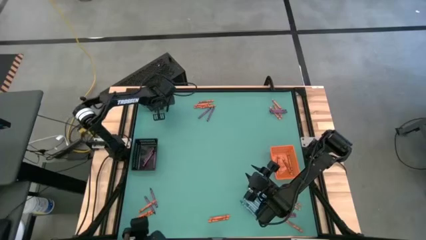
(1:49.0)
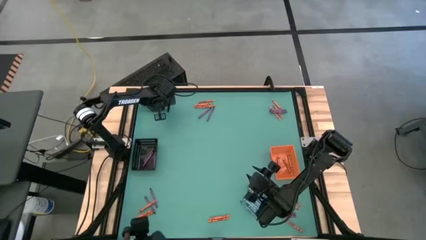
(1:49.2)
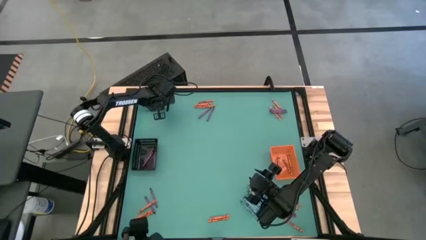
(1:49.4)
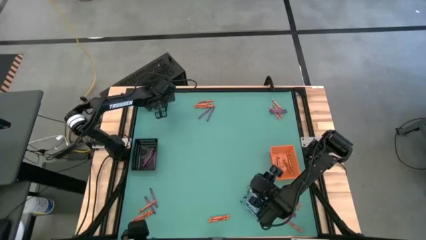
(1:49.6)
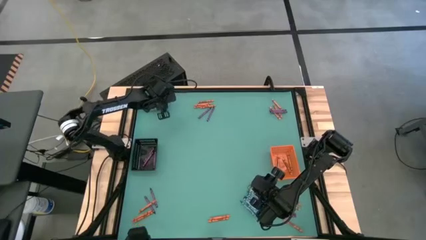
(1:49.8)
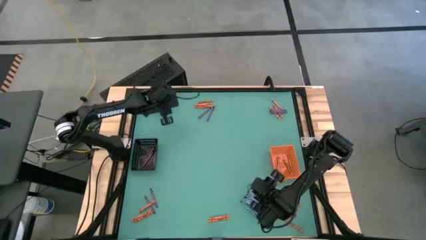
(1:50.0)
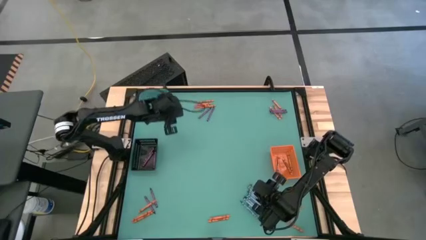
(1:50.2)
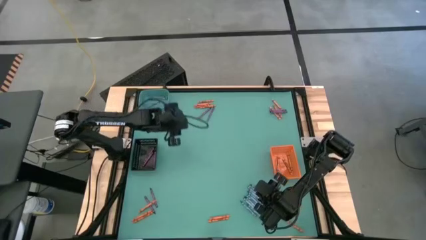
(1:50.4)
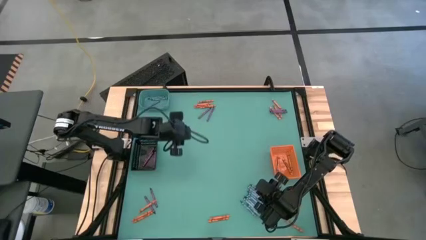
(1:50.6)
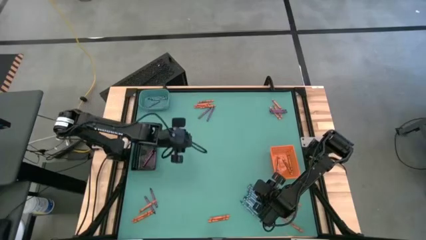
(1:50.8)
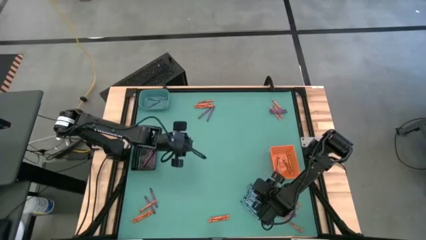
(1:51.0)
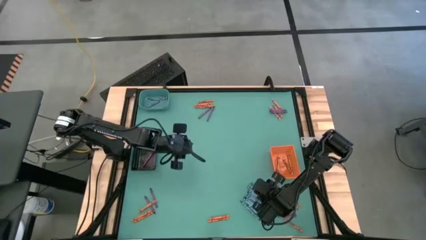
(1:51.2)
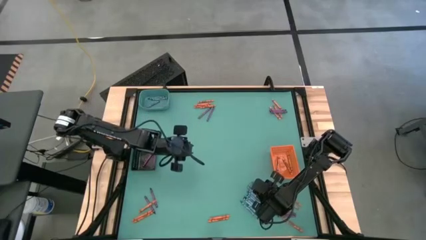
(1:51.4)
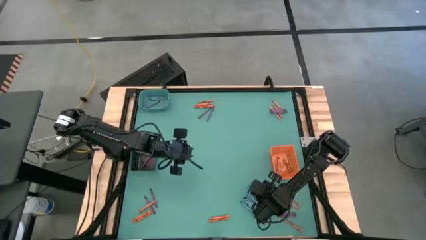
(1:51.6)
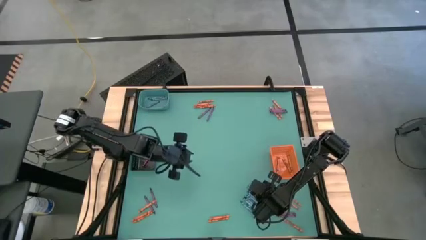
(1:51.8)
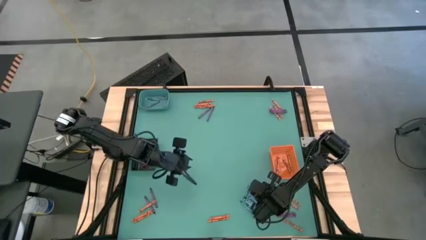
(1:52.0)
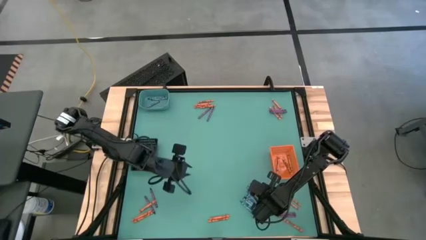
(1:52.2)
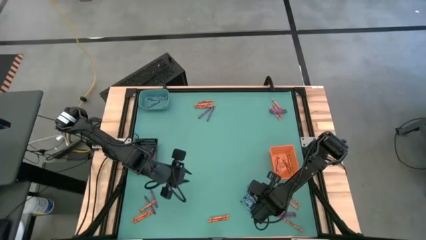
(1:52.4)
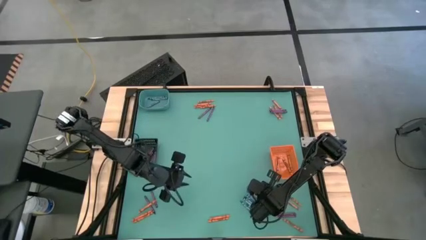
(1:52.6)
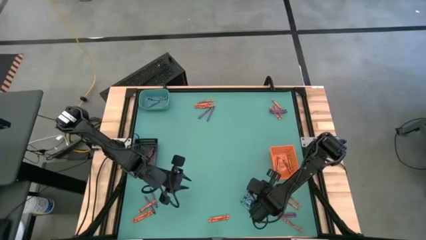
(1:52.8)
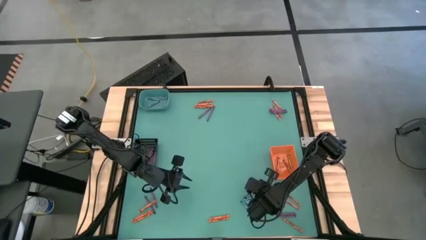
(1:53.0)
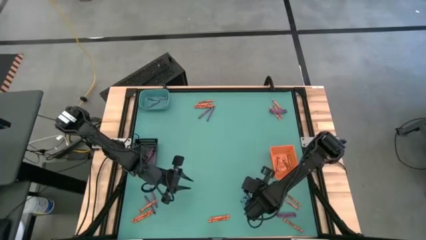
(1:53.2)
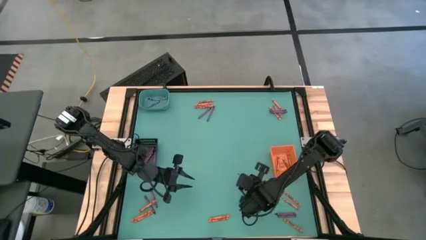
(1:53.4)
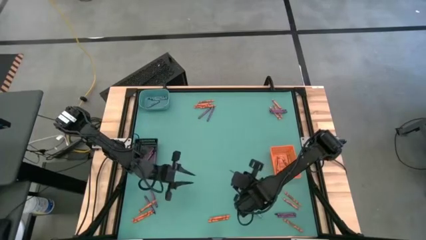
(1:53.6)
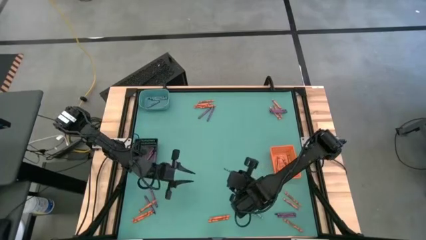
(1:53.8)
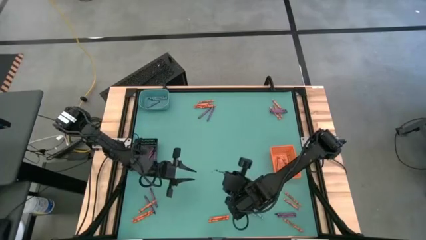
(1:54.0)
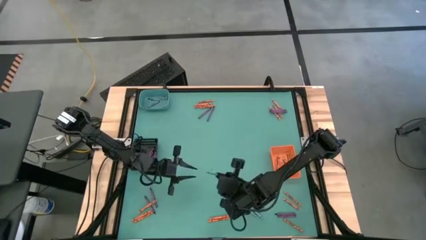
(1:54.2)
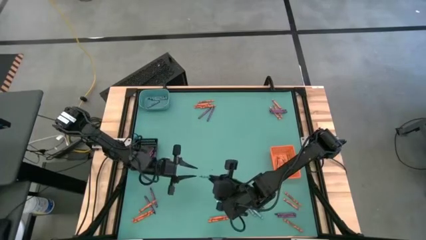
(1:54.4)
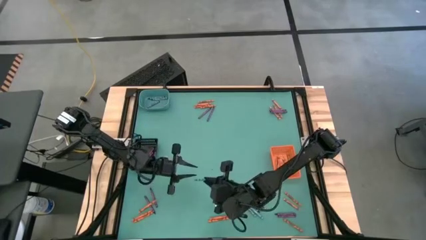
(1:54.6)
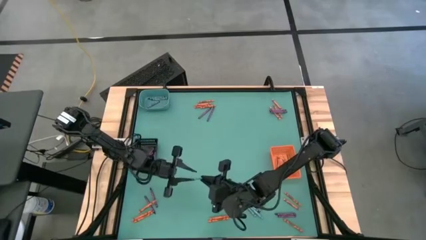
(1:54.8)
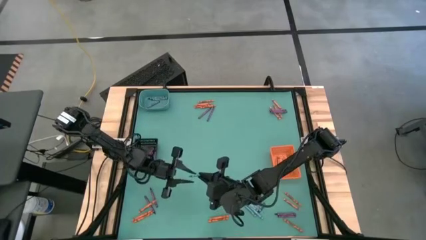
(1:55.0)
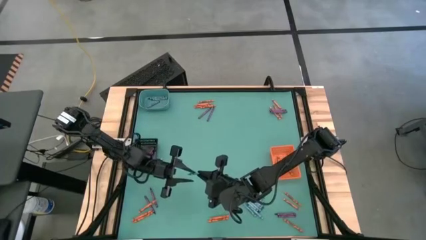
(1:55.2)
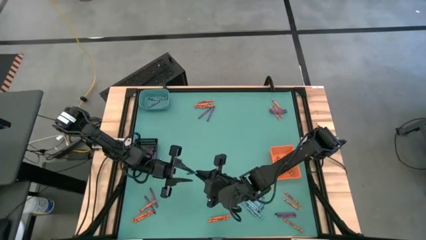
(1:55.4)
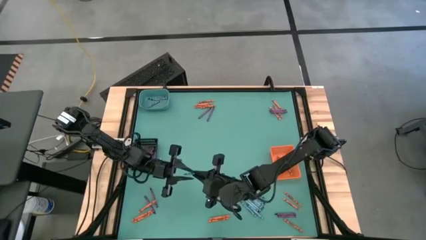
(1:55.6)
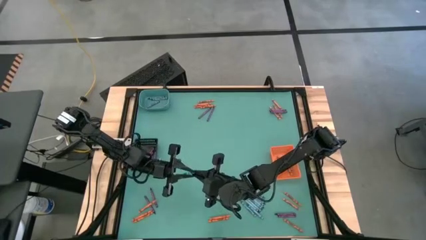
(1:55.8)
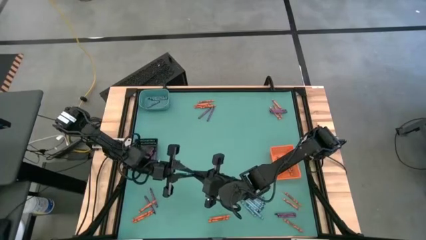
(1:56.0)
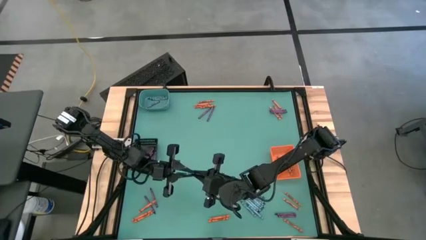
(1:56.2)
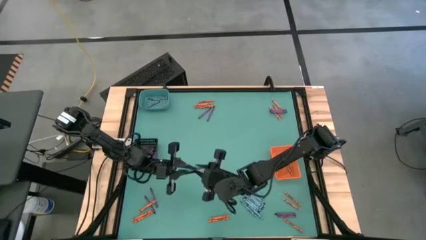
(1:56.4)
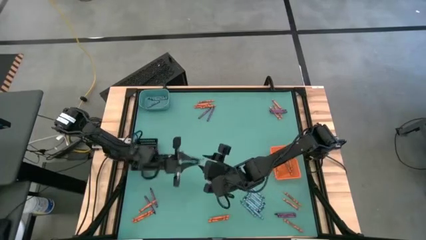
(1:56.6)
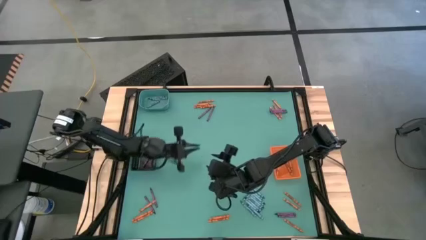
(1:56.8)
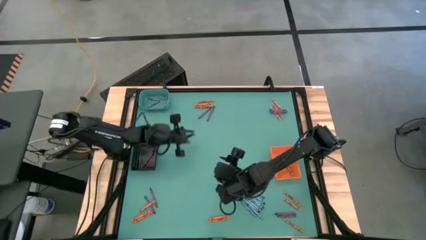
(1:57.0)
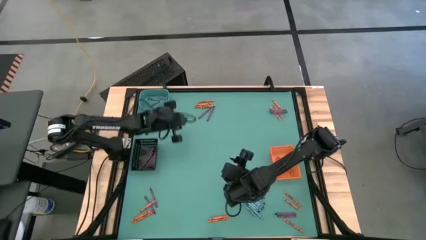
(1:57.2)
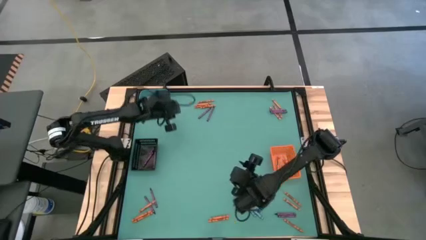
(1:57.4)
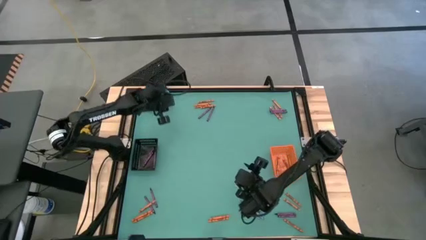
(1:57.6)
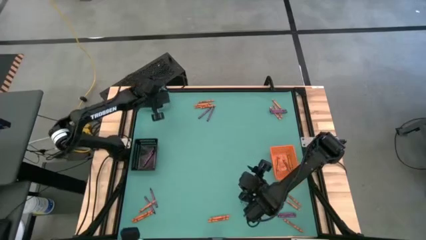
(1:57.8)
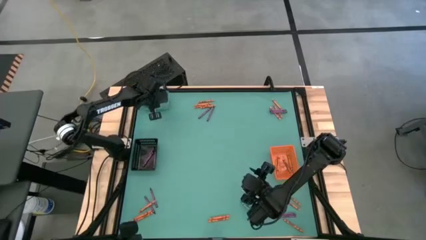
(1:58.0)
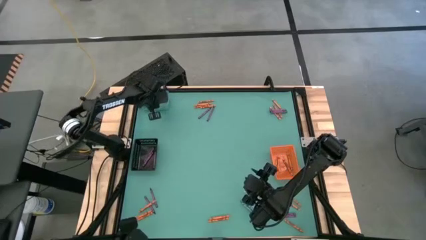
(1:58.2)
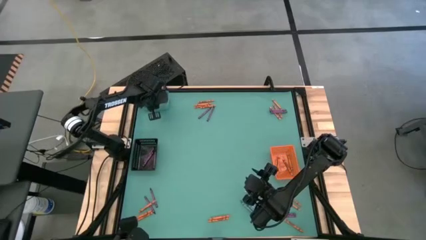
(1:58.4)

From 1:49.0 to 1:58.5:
Task: Sort crayons
Put the green crayon into the green bin

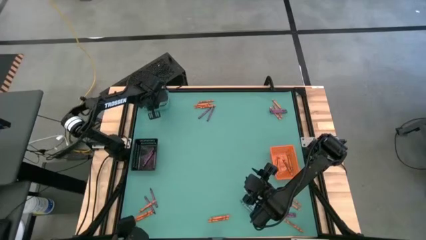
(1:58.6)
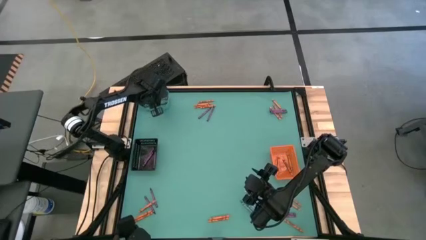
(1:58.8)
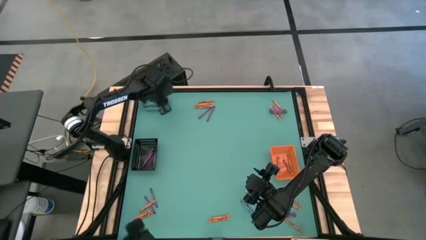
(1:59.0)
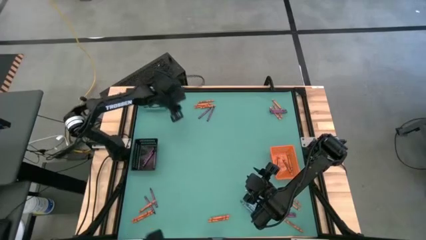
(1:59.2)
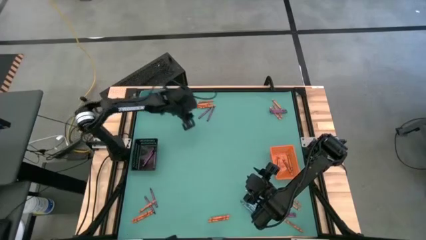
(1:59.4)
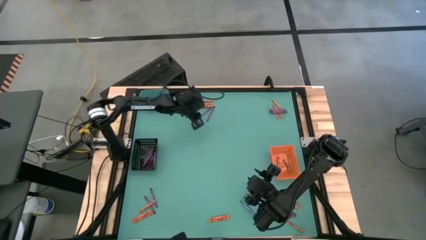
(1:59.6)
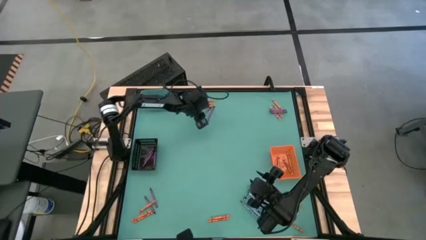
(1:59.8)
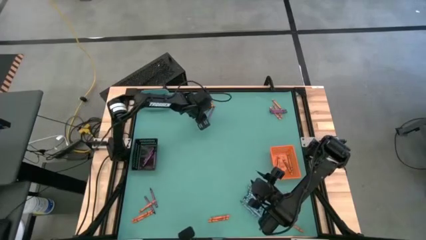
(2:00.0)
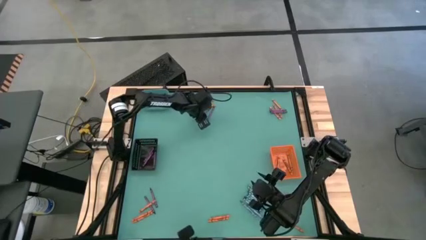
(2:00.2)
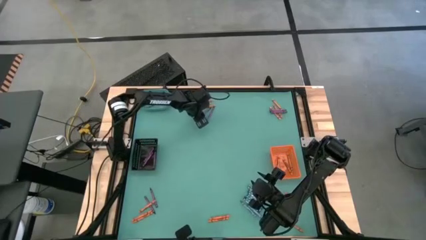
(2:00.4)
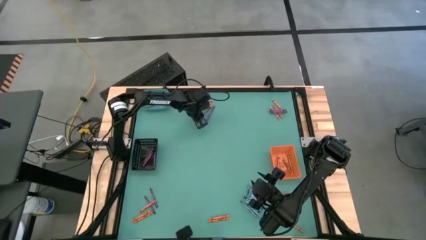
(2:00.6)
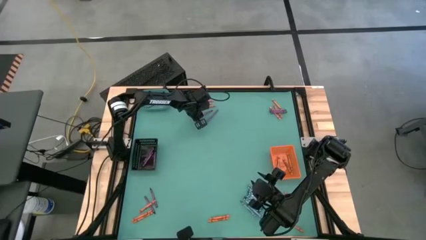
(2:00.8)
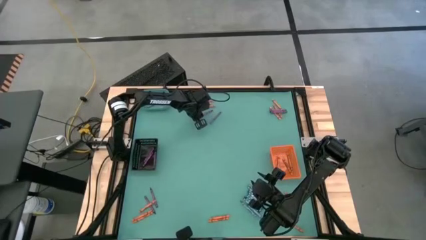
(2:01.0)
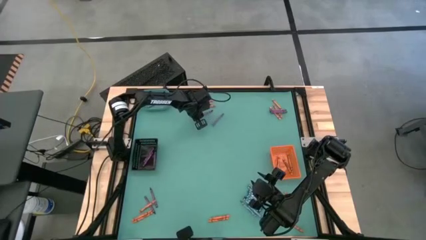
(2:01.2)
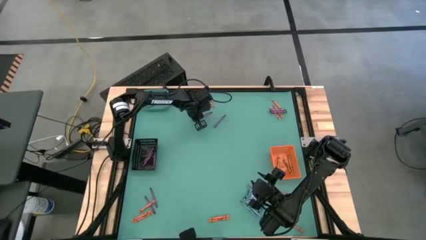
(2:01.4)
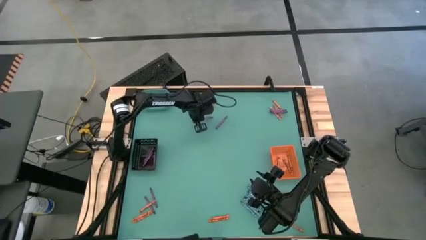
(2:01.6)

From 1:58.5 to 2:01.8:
Put the purple crayon into the black bin

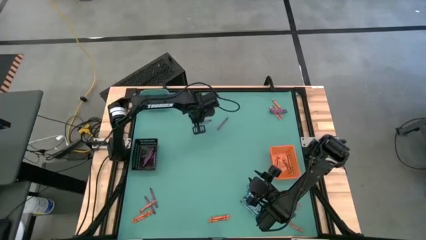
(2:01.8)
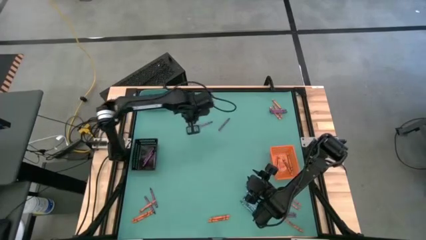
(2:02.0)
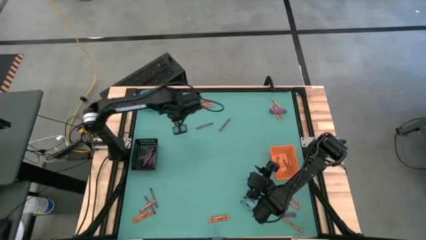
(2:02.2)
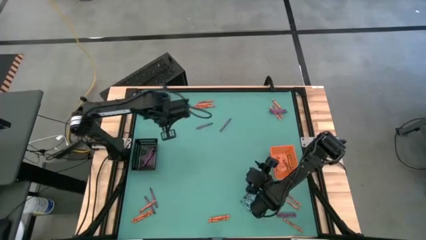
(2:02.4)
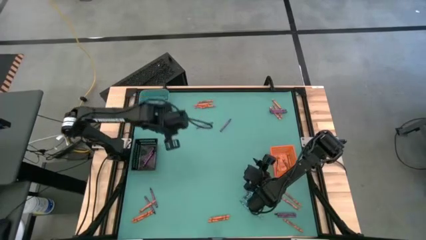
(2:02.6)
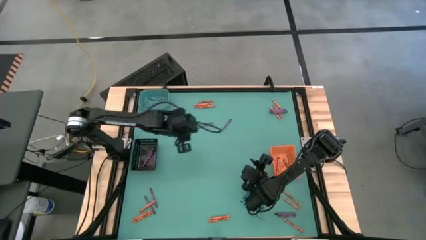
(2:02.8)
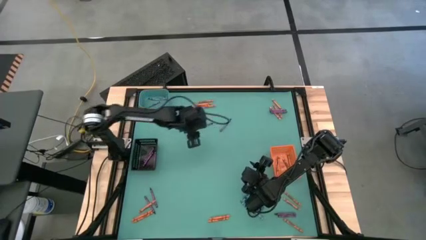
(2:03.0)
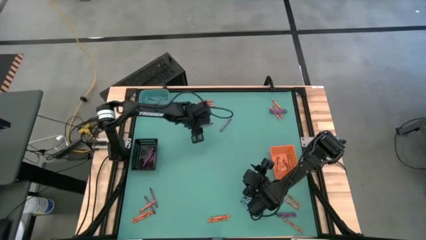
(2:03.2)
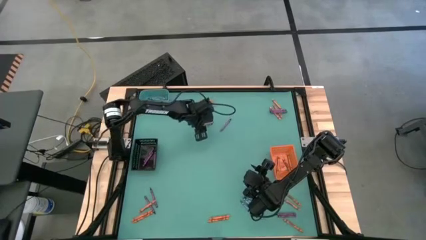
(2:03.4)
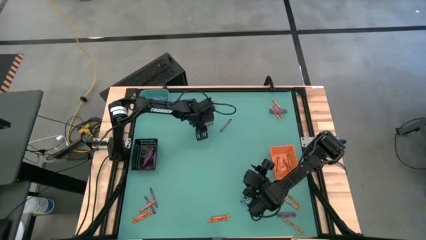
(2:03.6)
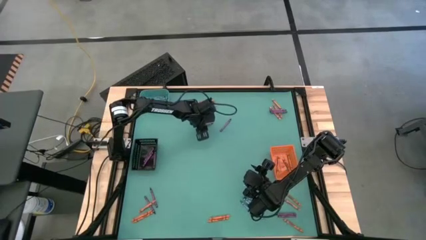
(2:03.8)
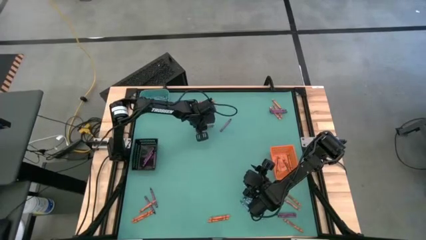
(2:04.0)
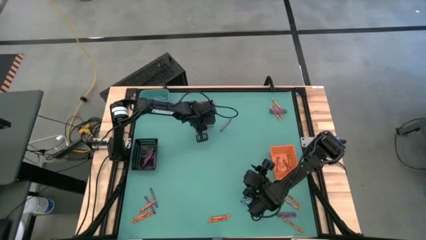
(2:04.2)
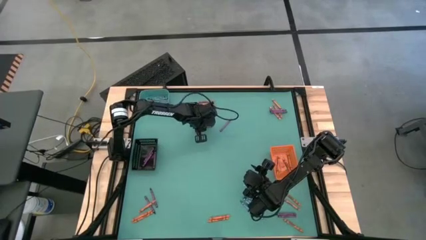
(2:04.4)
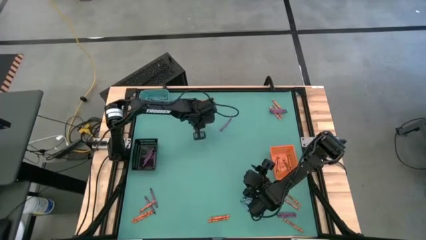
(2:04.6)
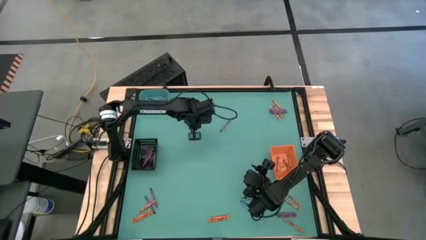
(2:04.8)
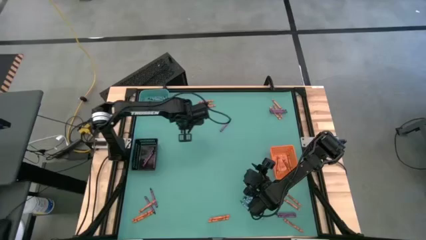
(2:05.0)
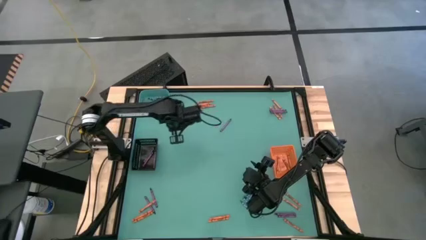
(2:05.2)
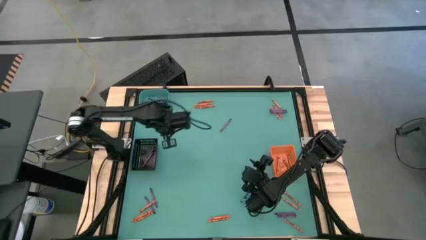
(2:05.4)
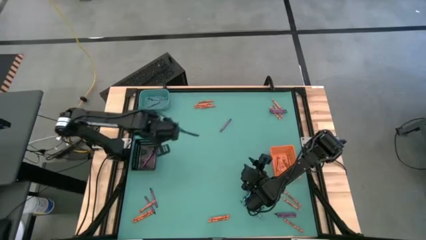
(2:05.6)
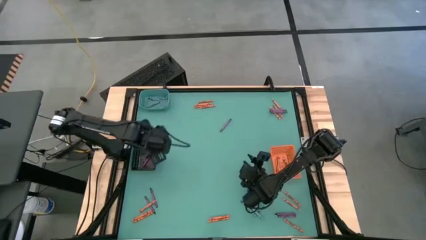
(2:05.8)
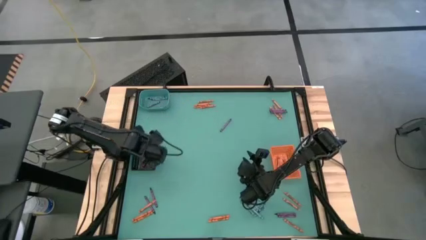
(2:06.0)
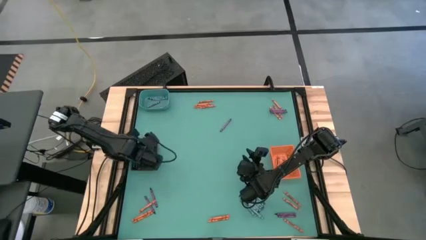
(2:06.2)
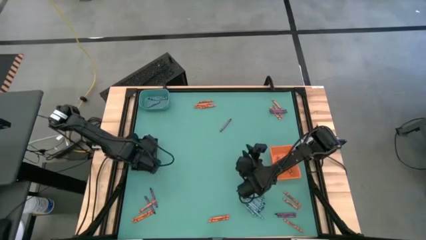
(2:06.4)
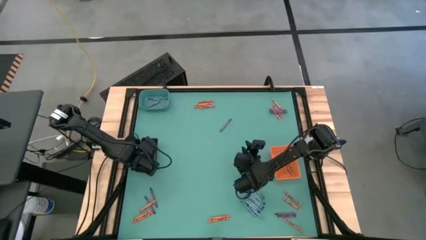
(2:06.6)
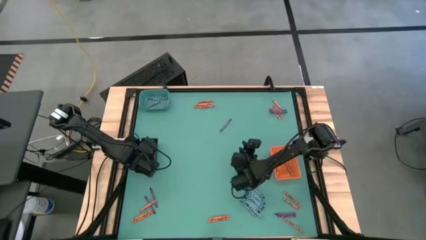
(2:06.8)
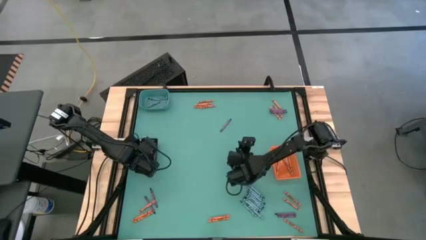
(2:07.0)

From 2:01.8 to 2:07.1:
Put the purple crayon into the black bin
